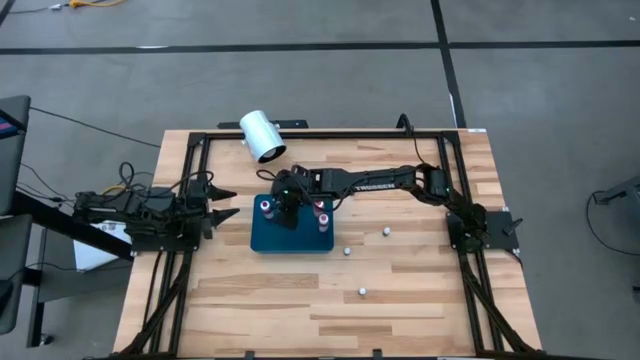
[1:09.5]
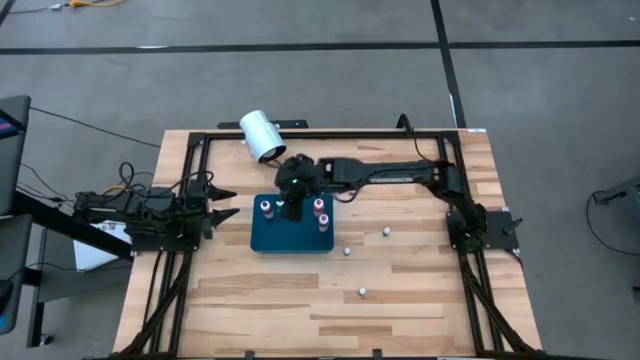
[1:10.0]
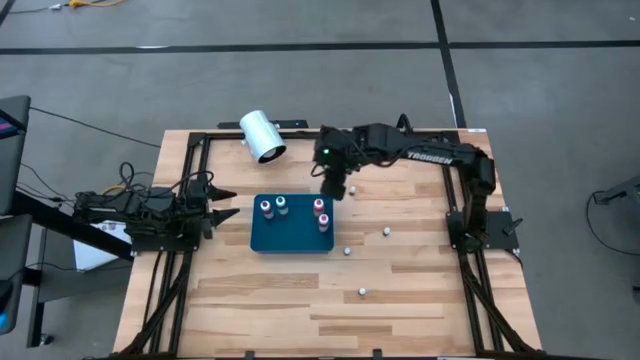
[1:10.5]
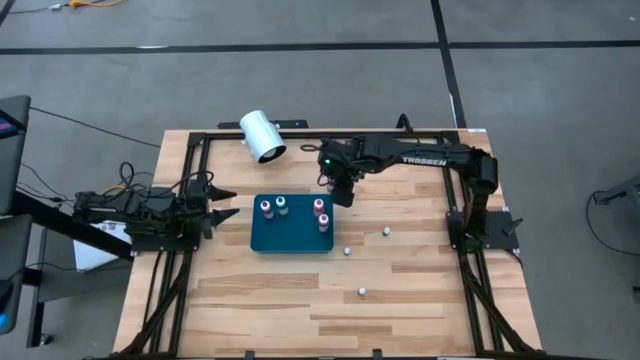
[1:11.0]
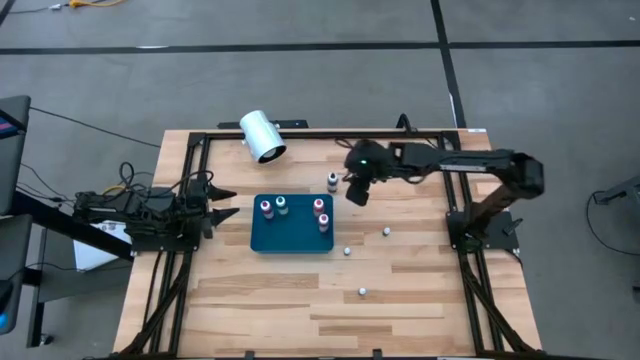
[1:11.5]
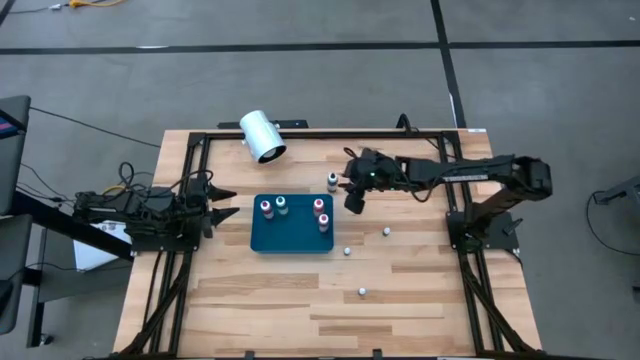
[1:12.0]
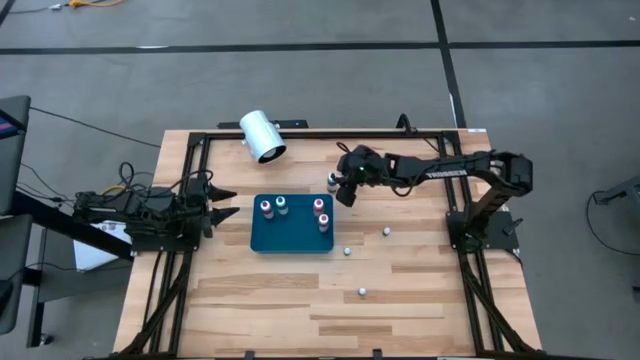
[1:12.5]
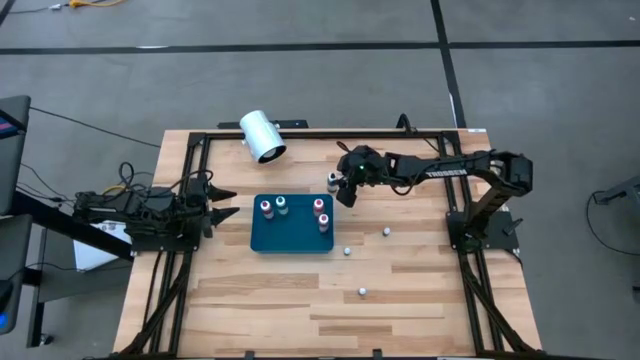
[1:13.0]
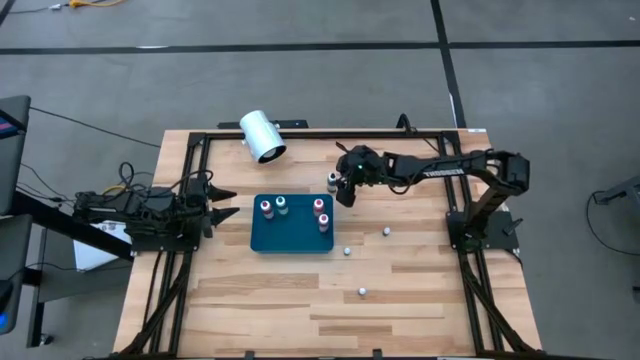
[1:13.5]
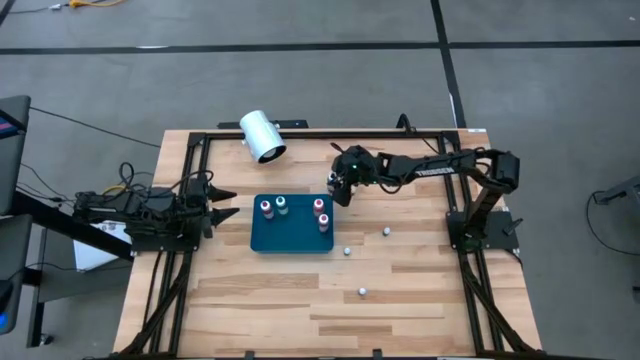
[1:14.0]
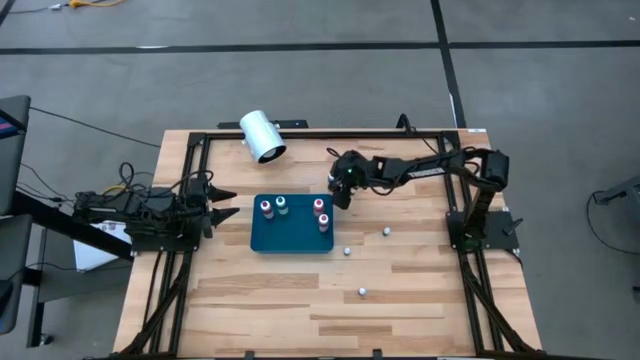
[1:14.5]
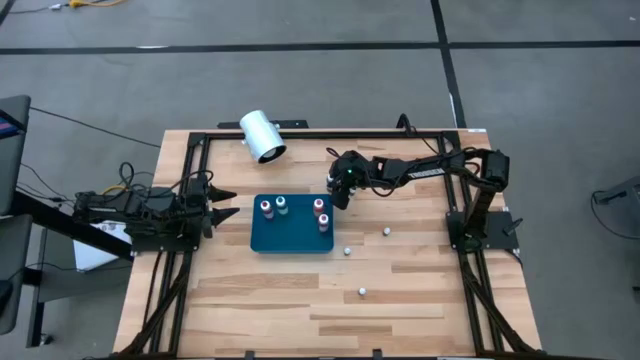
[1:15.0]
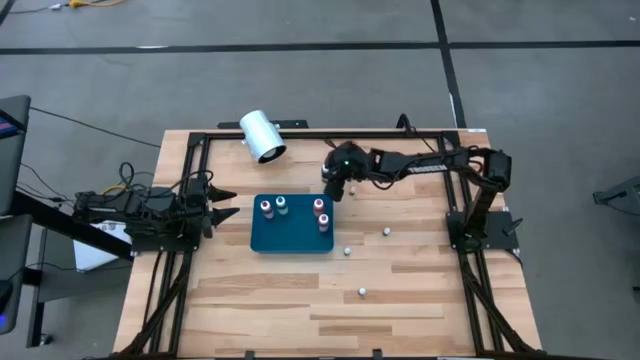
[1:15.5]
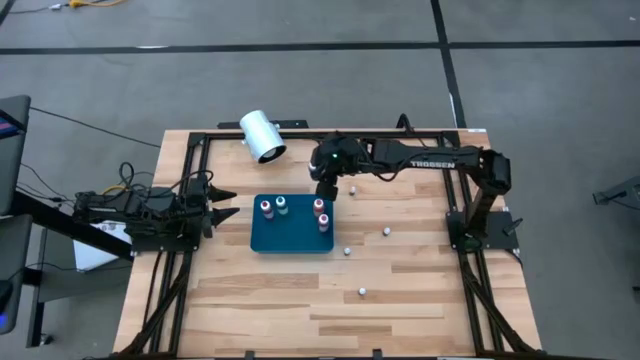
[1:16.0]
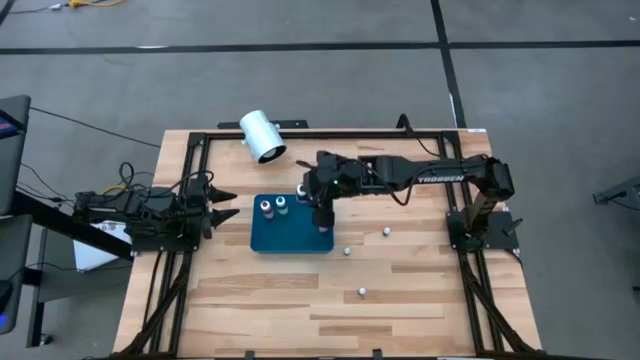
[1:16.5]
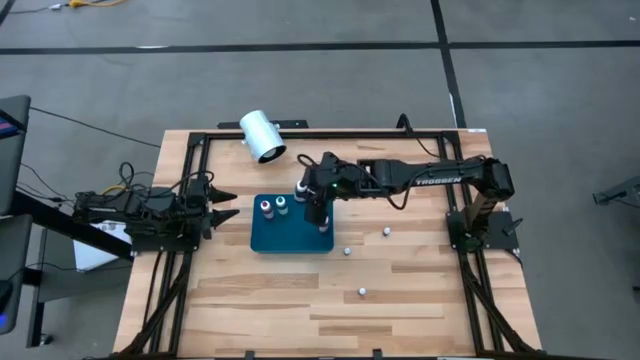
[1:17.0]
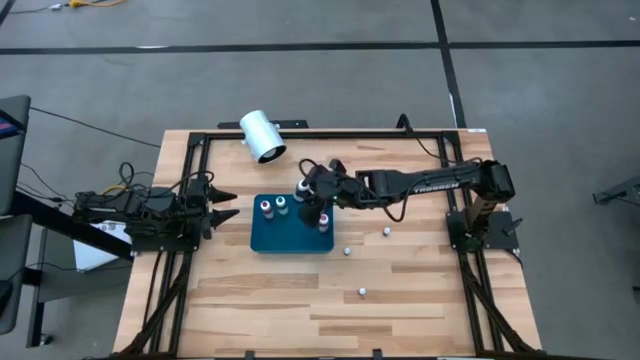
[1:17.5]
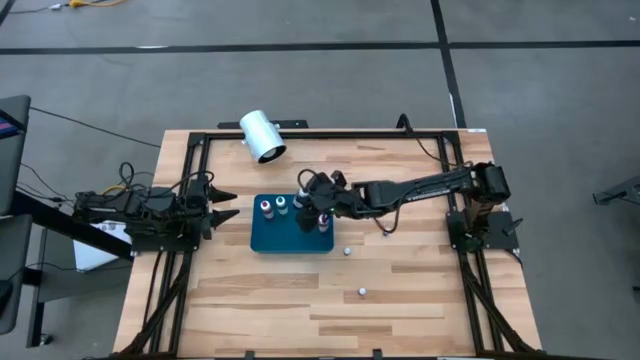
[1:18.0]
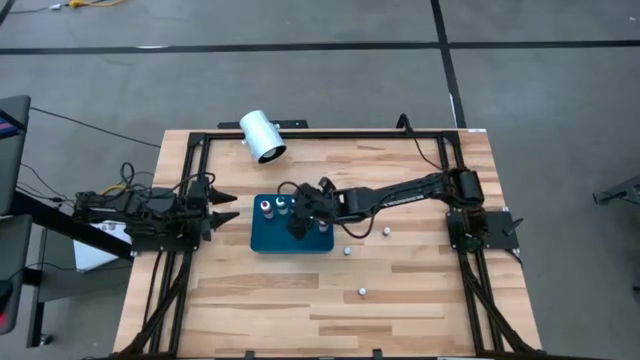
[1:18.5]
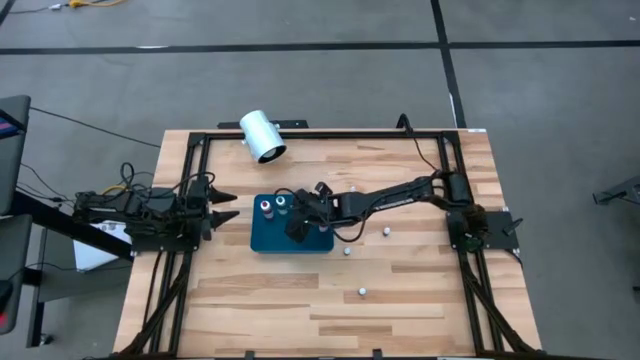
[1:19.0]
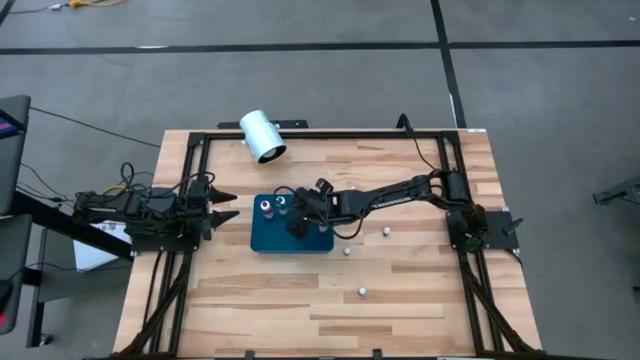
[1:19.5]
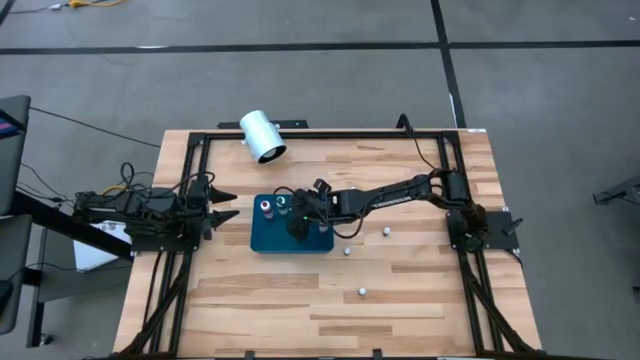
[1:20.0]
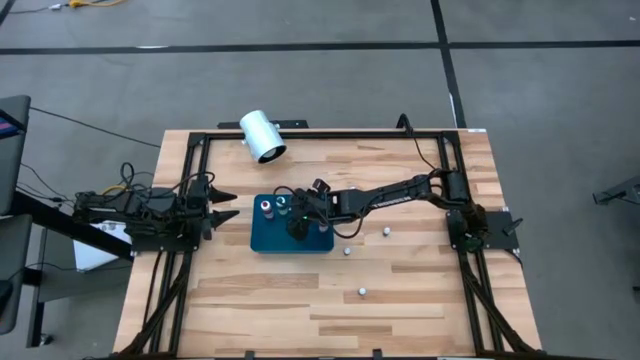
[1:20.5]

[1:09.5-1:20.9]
Task: Pick & Place food coloring
Put the large black food coloring bottle into the bin

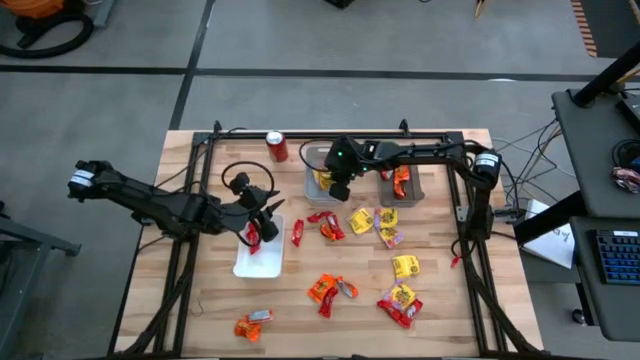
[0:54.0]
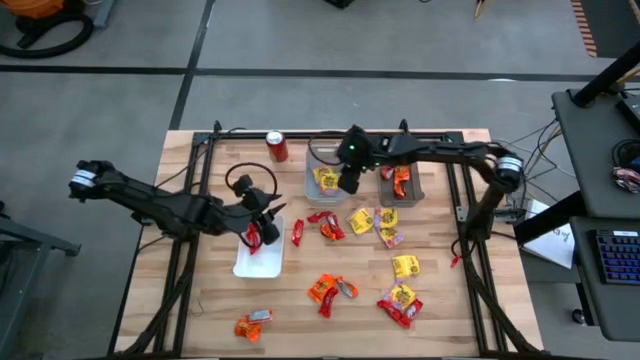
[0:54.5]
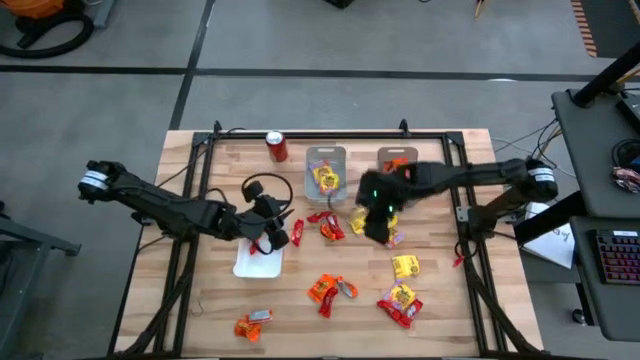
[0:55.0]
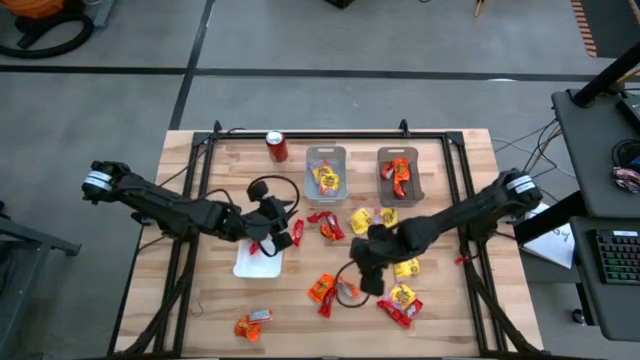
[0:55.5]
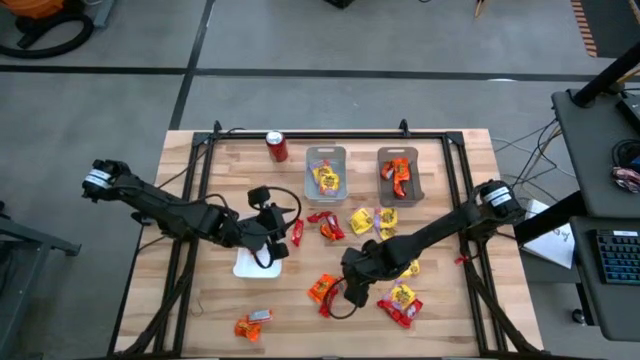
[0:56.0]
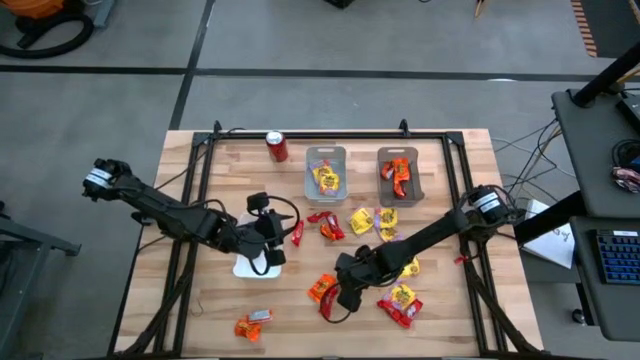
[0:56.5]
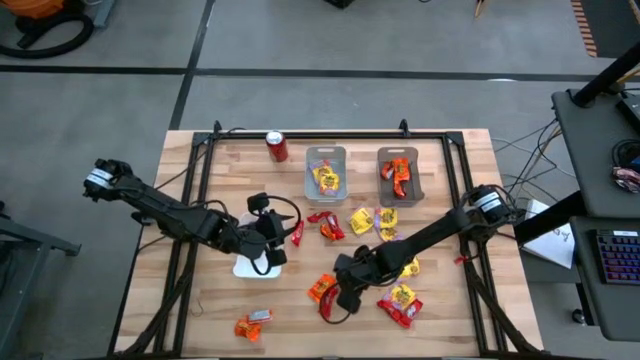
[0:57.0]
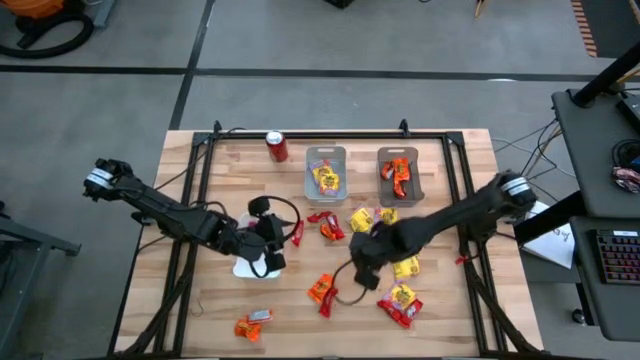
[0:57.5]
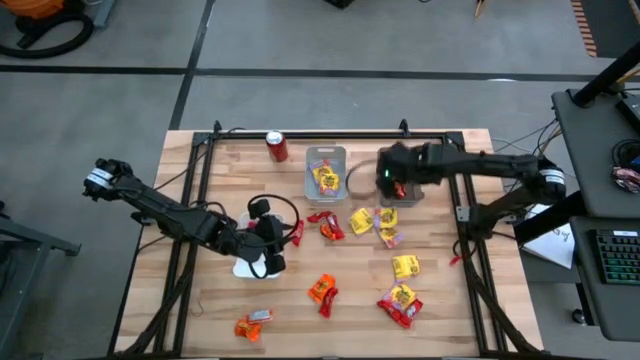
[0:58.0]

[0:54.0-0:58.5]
Task: Sort candy
Put the orange candy into the black bin

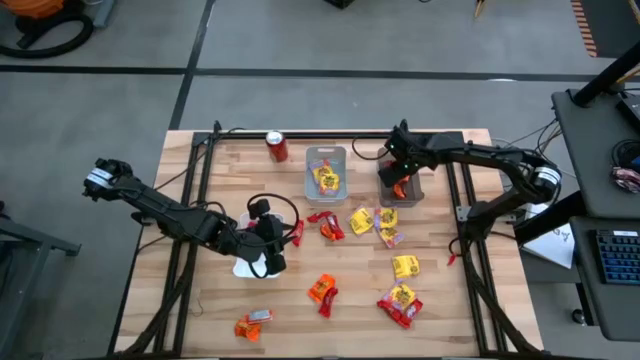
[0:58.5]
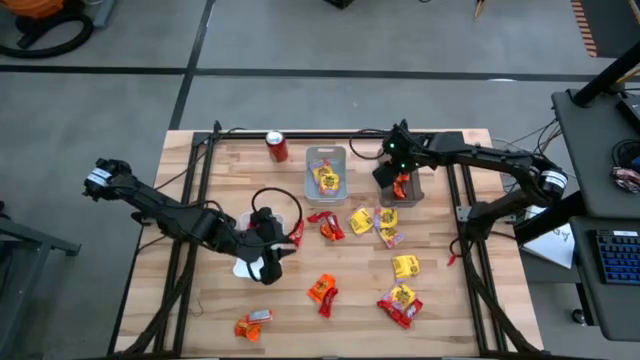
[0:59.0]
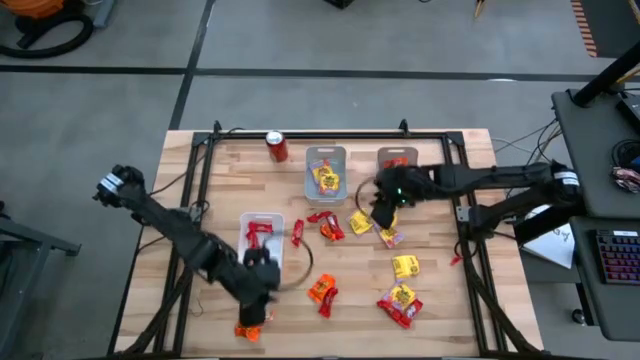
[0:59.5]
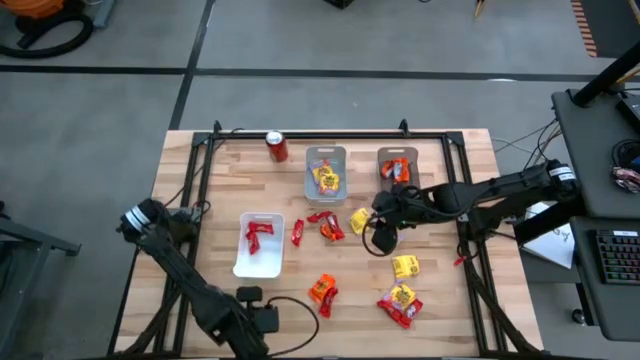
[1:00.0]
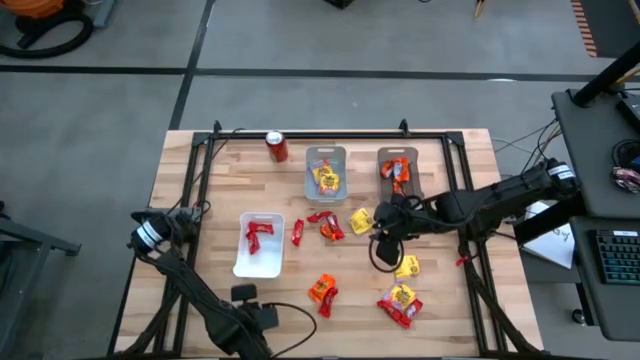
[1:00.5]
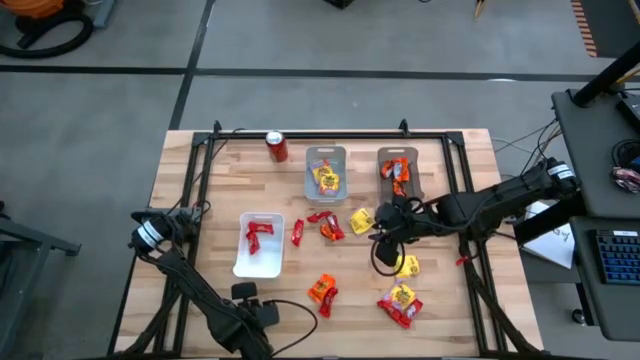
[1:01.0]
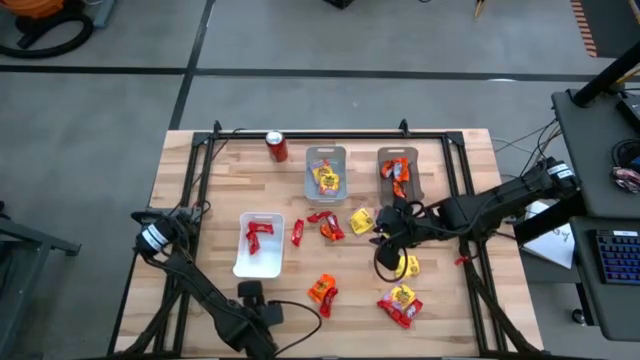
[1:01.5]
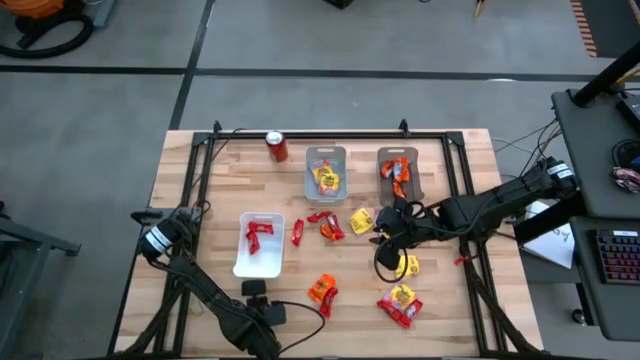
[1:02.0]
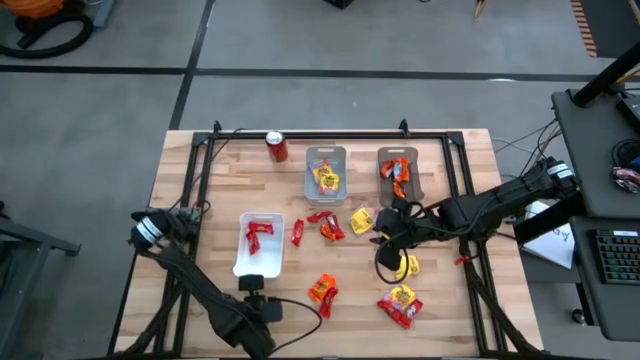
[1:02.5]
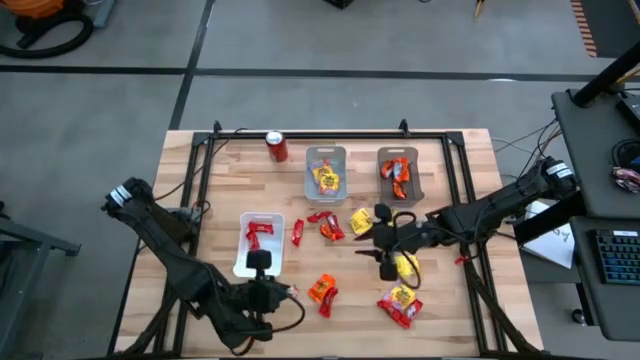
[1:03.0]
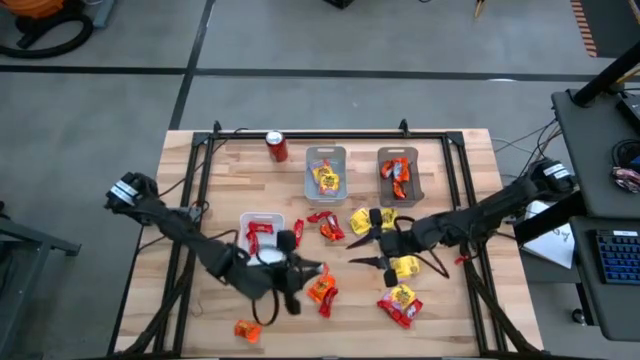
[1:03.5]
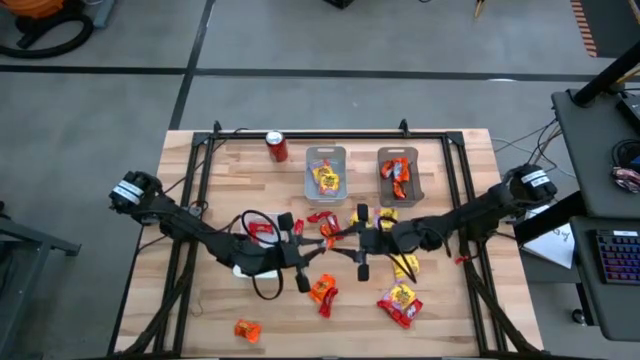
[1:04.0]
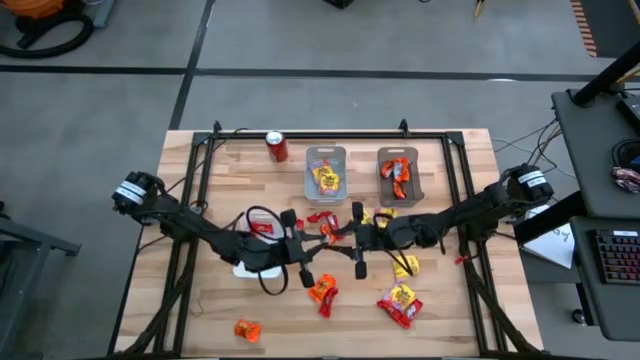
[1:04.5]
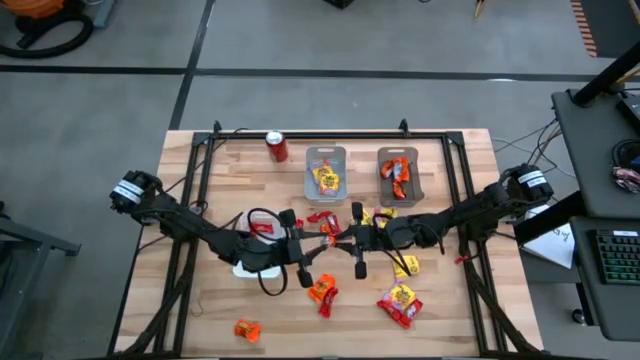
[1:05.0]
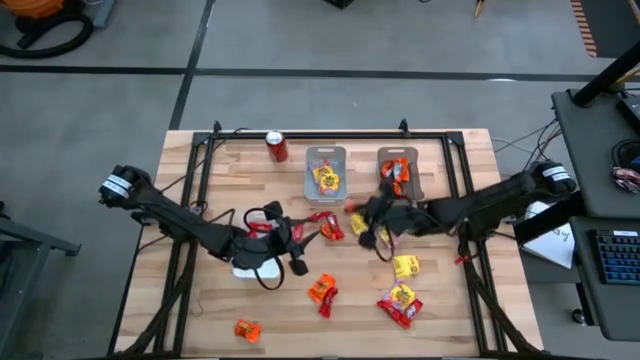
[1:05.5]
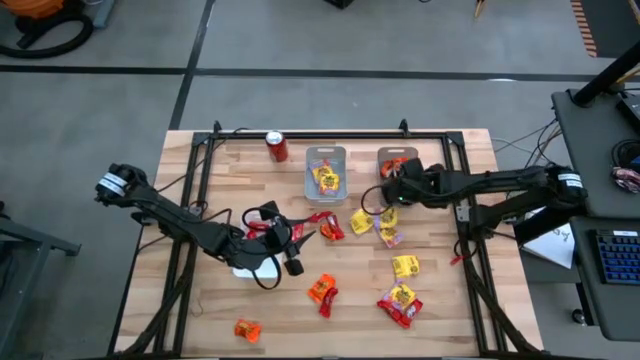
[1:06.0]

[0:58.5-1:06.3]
Put the orange candy into the black bin
